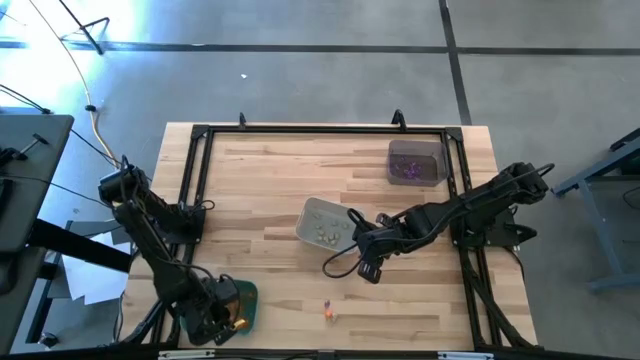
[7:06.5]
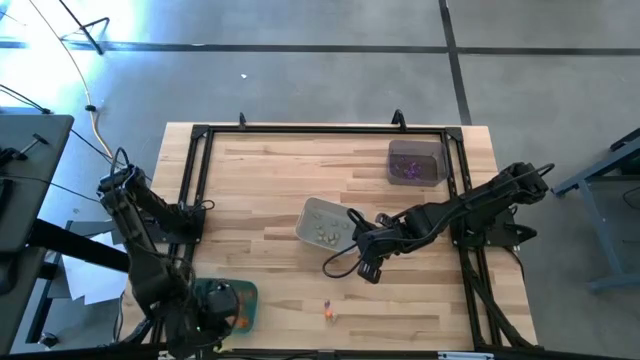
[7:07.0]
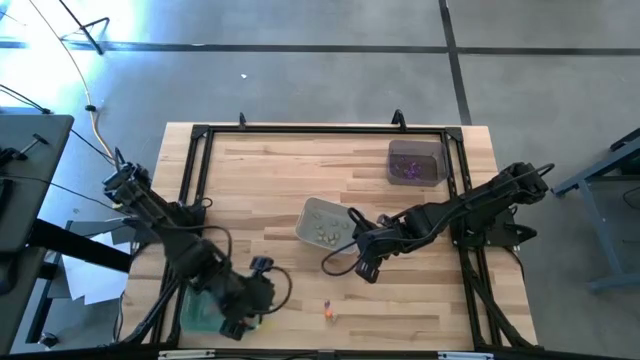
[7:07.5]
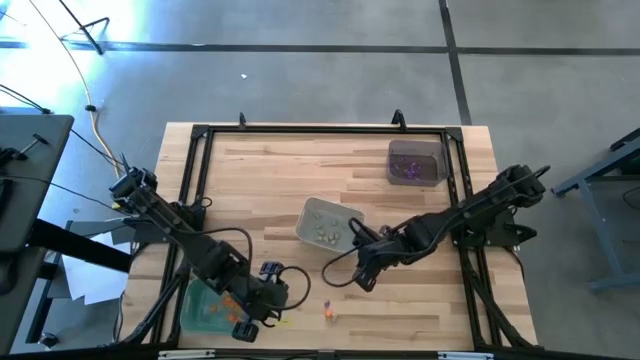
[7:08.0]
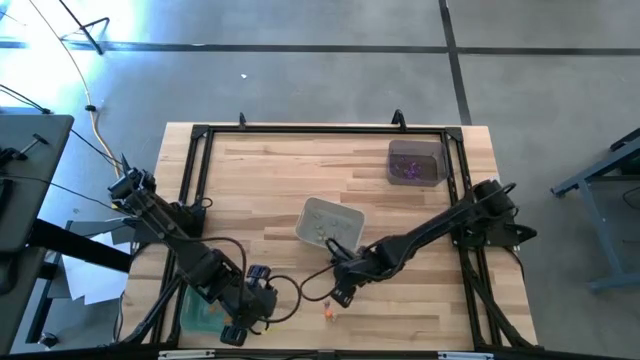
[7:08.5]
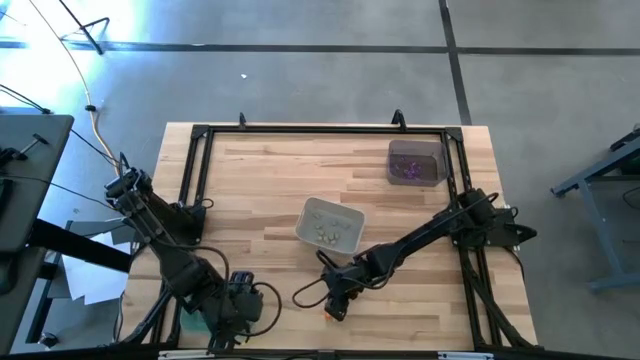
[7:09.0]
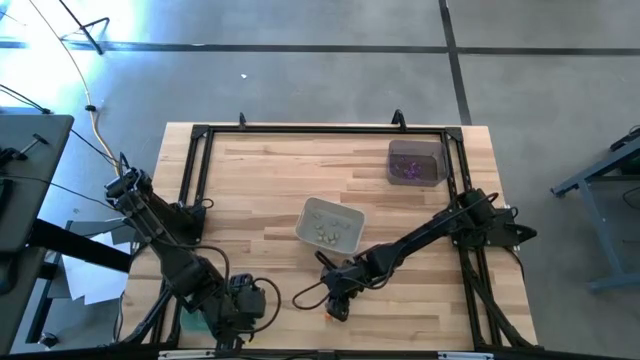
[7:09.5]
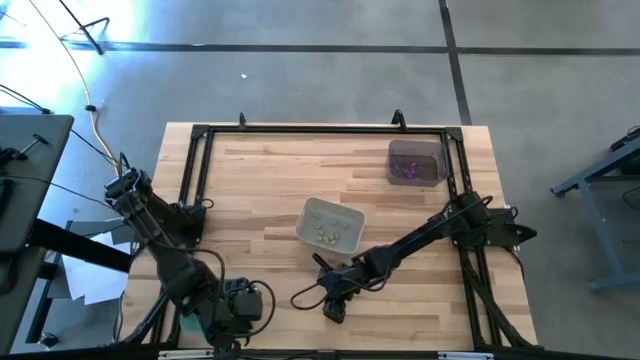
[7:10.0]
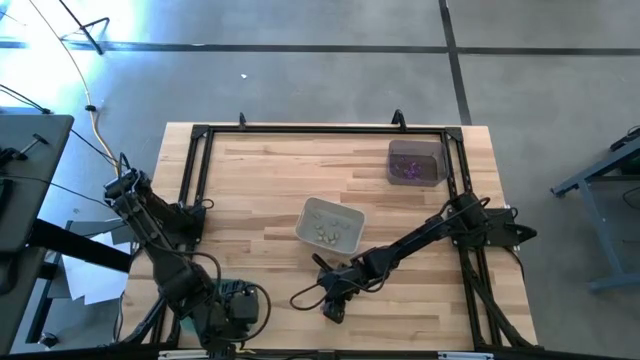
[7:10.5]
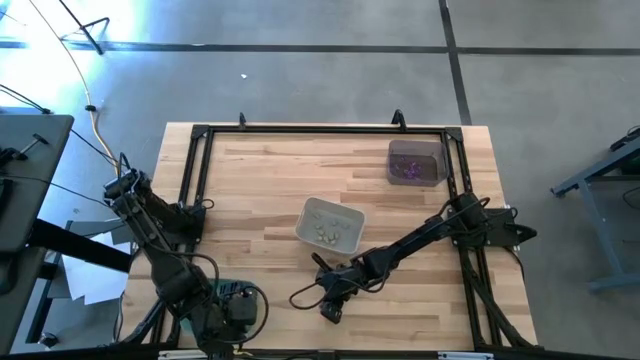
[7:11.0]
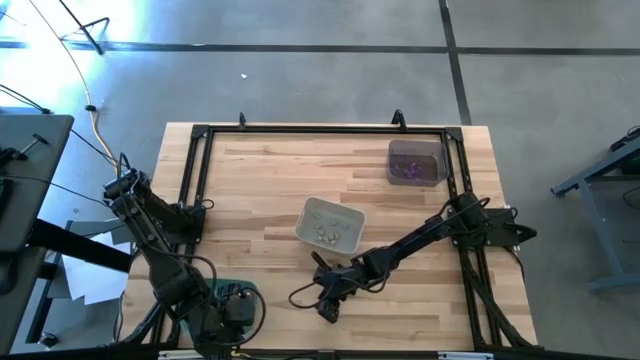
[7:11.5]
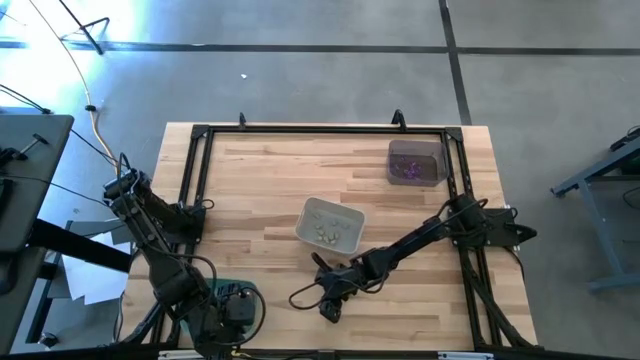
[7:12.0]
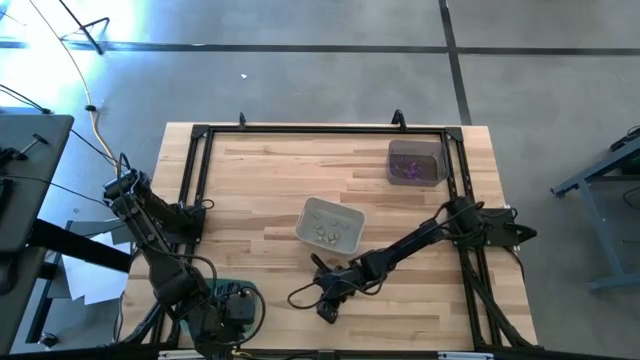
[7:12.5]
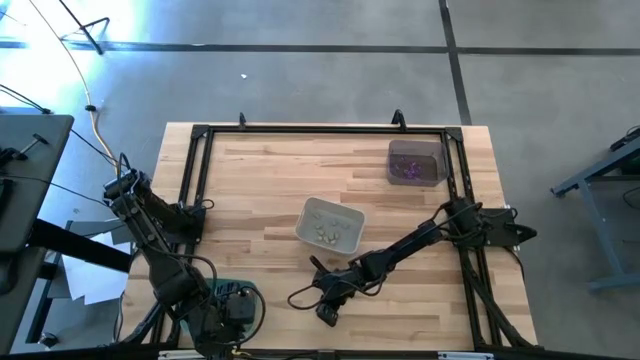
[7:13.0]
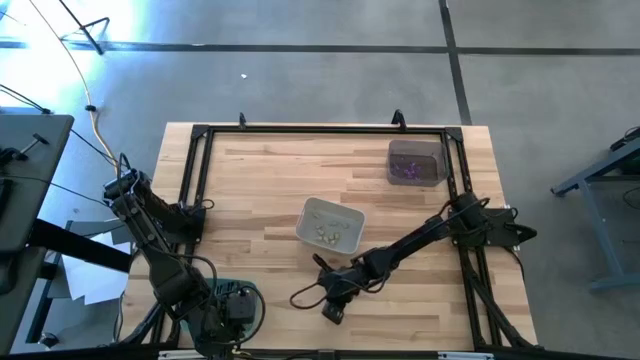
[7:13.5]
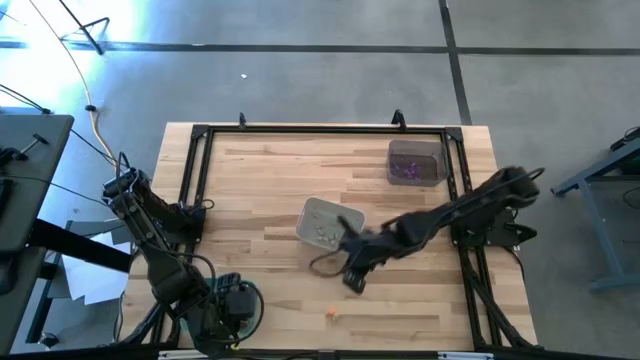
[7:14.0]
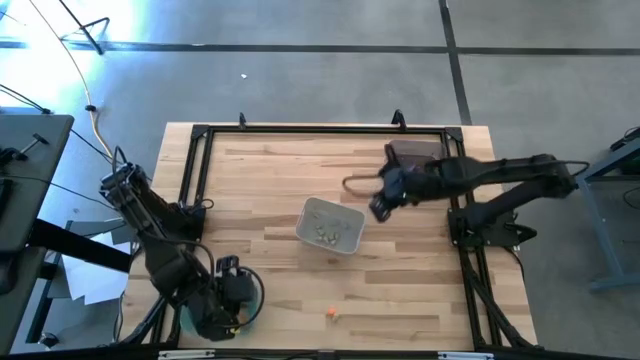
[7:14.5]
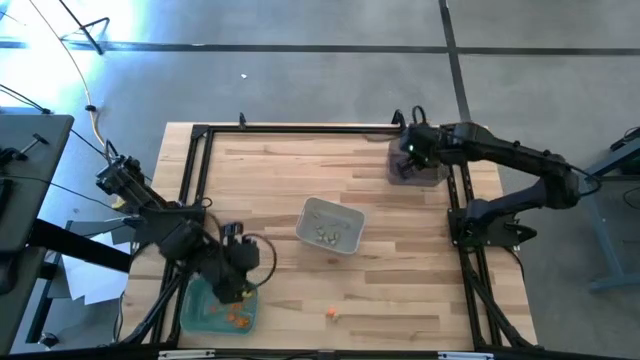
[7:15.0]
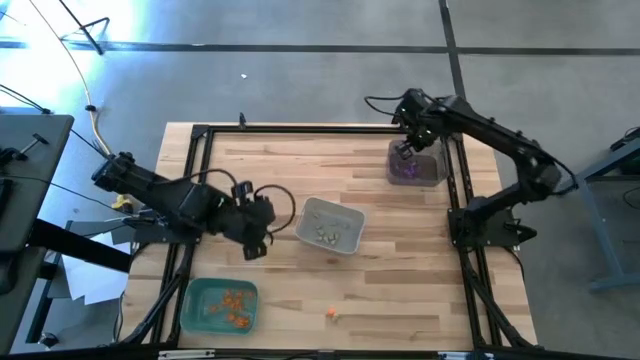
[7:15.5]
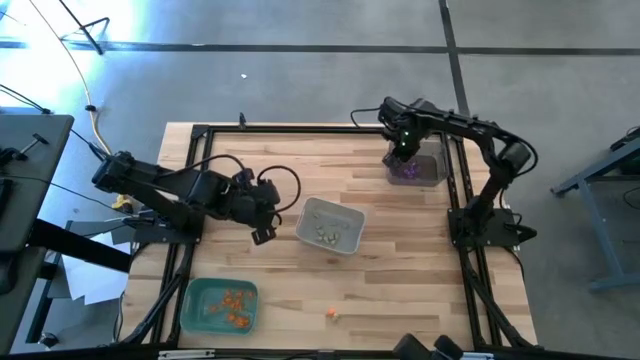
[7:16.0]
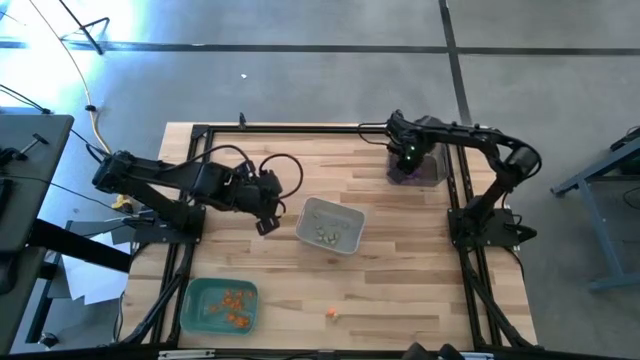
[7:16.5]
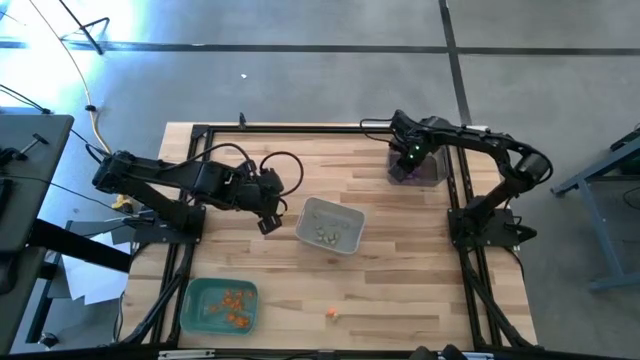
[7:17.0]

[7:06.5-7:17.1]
Task: Sort Halloween decoration
Put the violet witch hat toy into the black bin

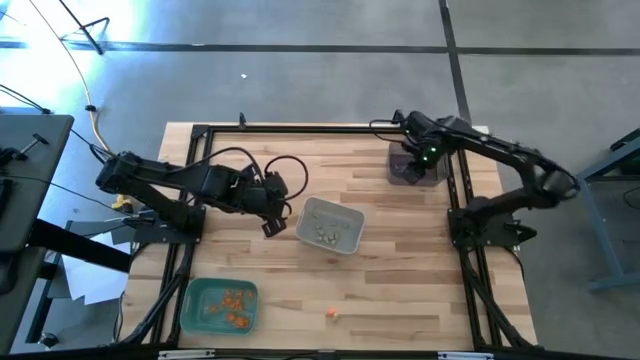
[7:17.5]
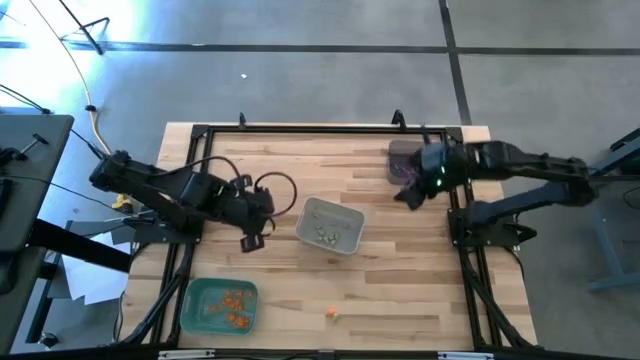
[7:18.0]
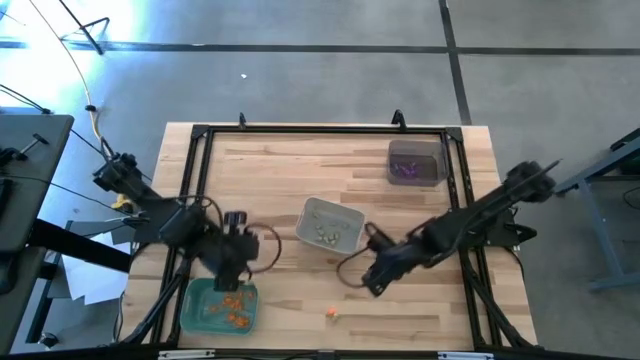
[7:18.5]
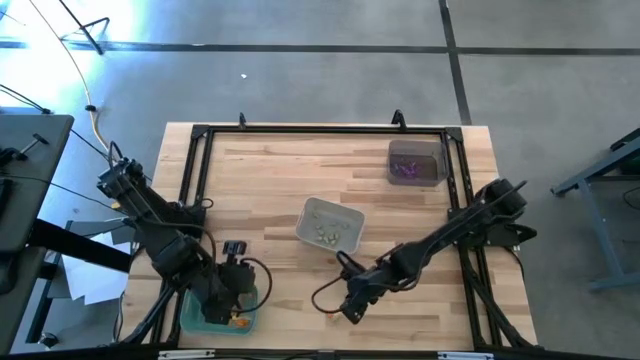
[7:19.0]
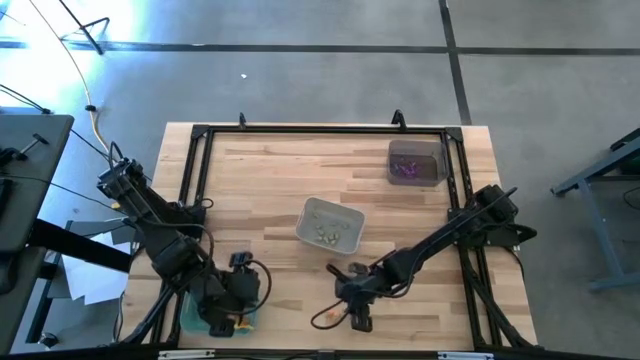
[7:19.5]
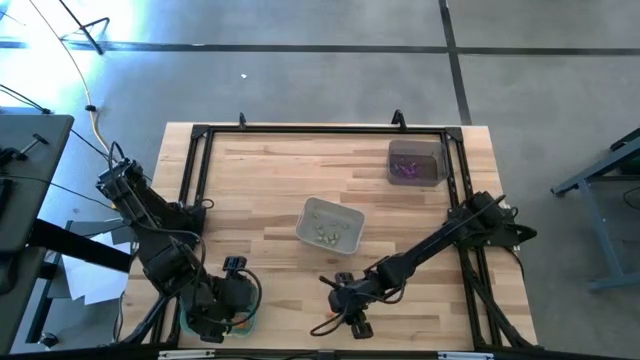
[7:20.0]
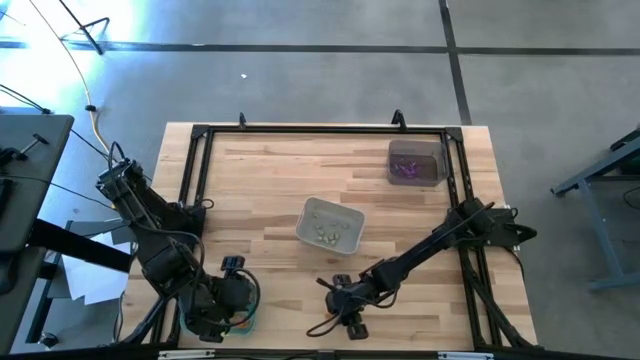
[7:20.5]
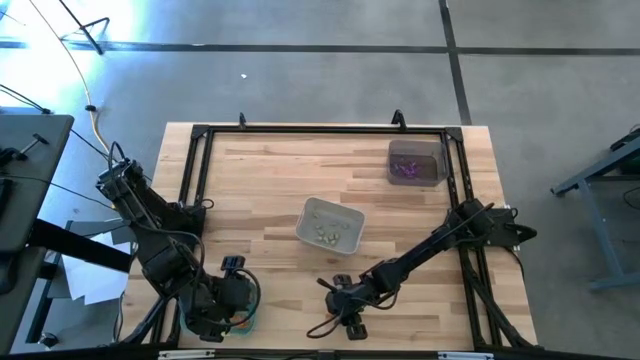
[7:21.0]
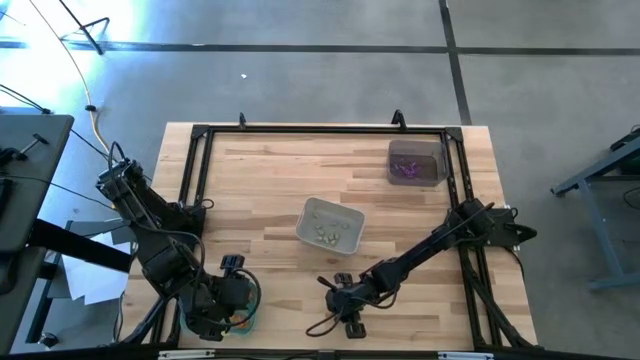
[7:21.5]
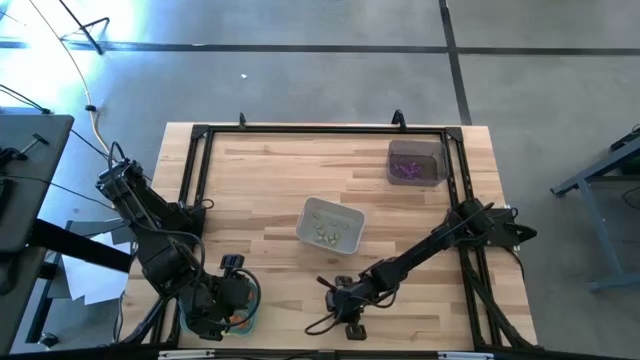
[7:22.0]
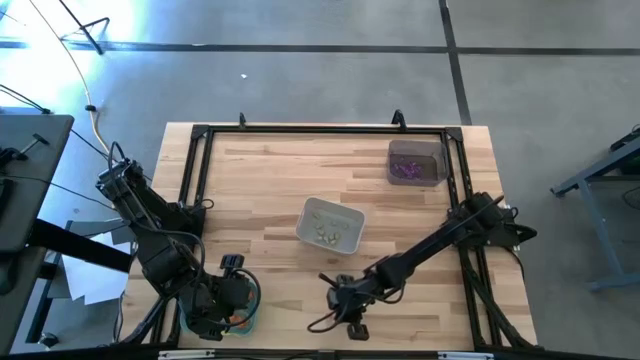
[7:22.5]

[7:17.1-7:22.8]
Put the white skull toy into the white bin

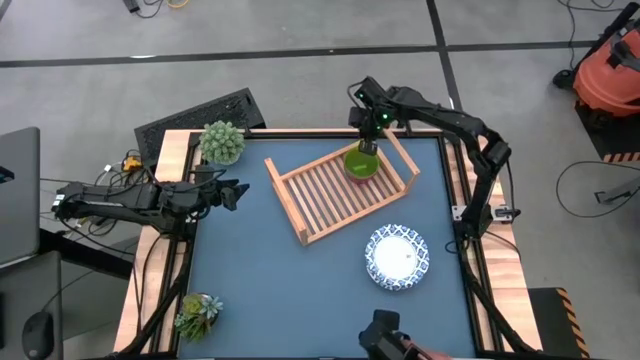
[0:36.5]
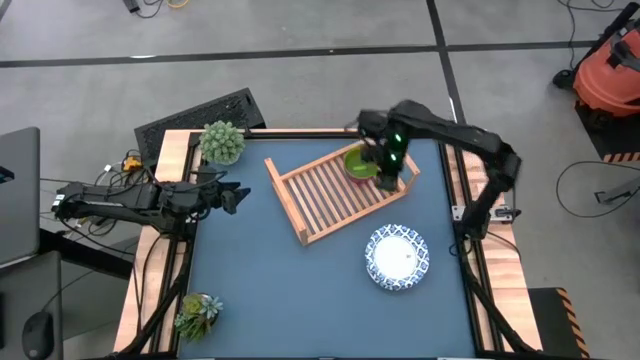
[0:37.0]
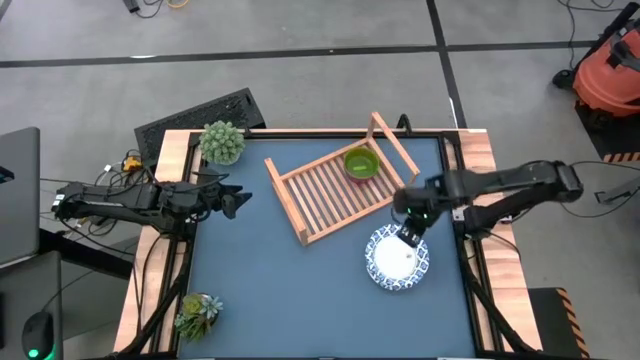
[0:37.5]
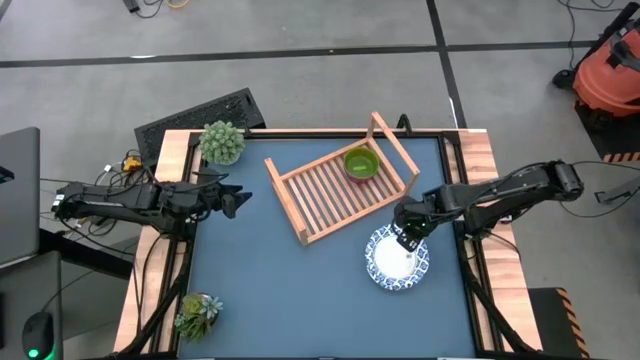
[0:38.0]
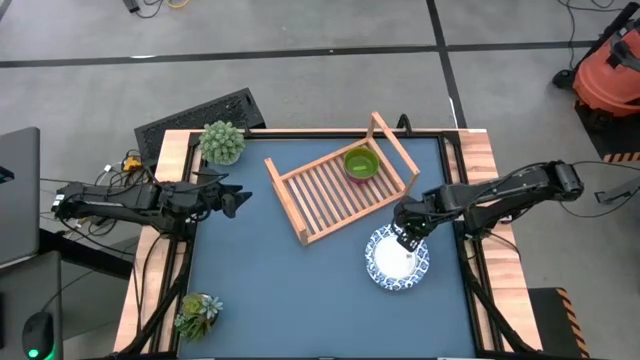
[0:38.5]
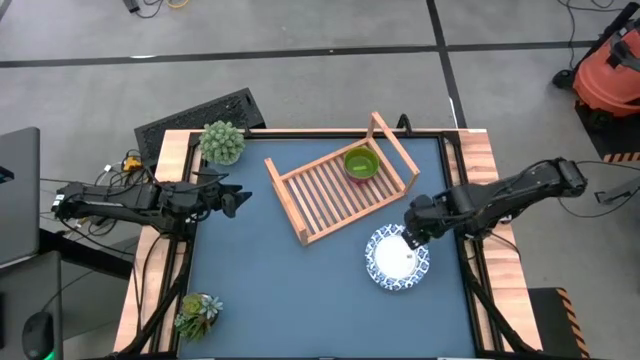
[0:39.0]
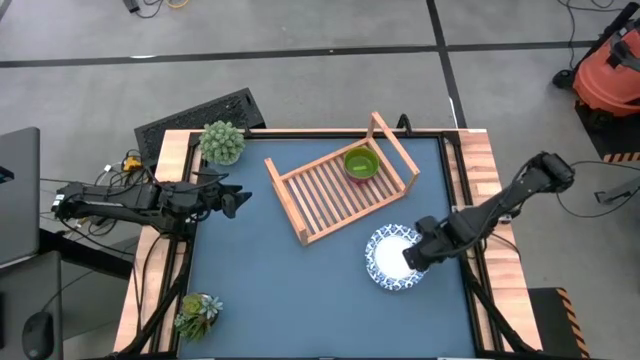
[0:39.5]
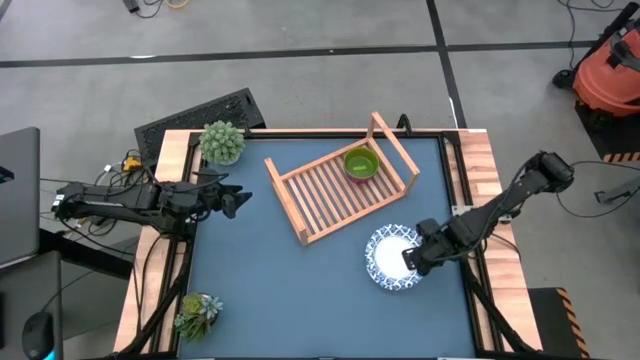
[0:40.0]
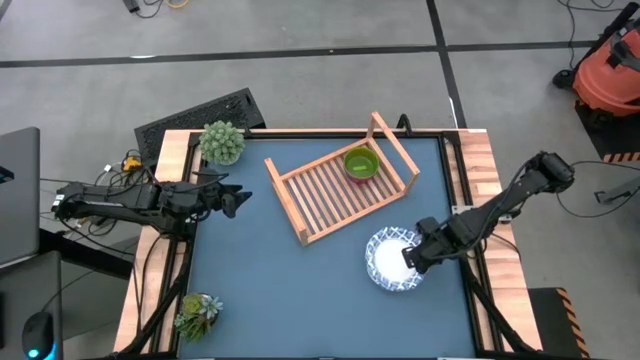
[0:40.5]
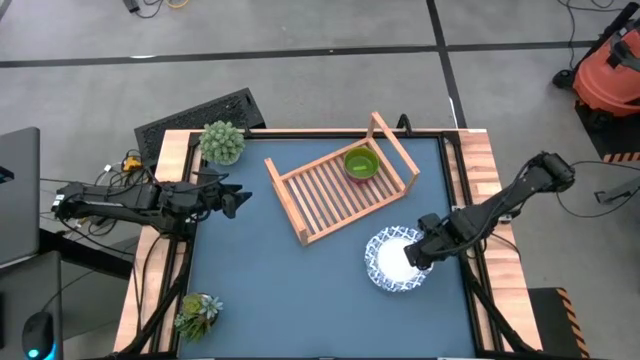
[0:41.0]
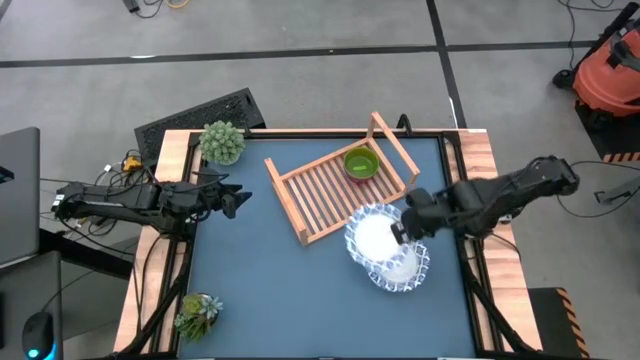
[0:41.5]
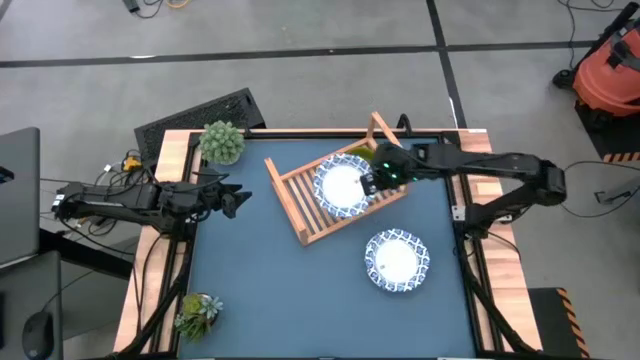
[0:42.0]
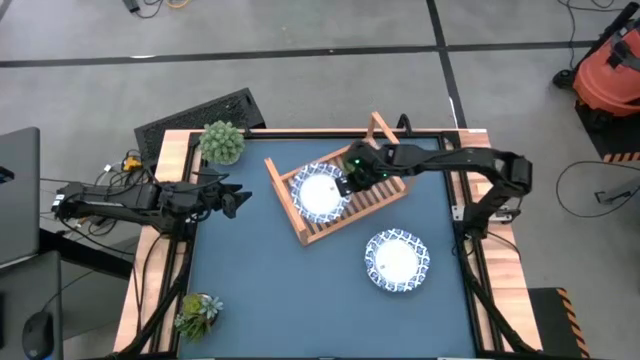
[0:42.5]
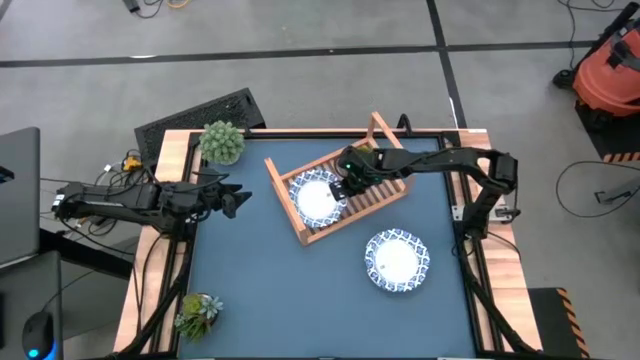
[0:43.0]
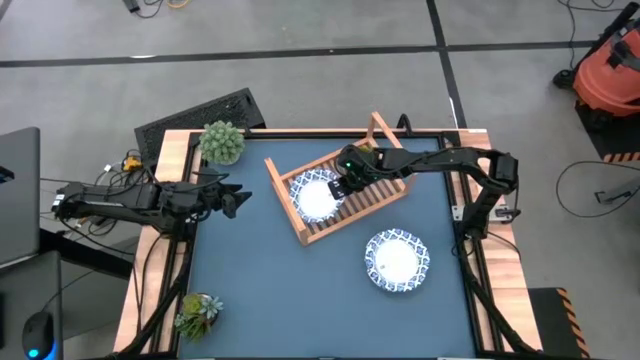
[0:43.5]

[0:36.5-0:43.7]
Task: Place and stack bowls onto a shelf
Put the blue patterned bowl on the shelf
